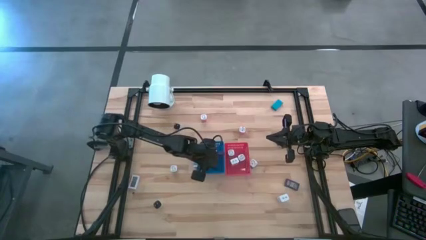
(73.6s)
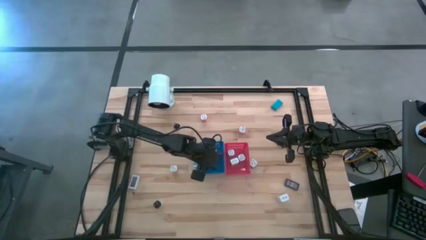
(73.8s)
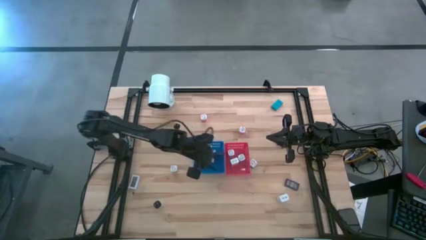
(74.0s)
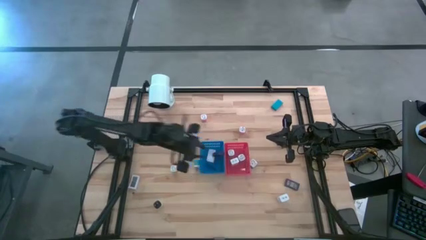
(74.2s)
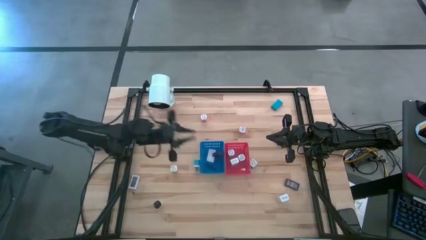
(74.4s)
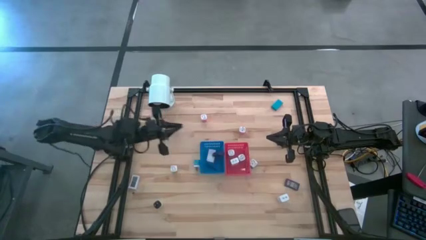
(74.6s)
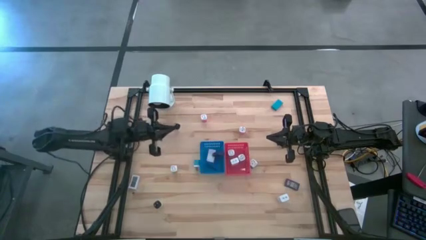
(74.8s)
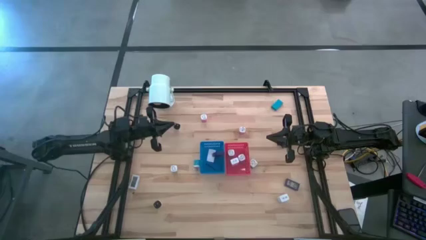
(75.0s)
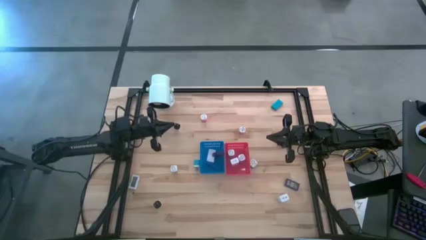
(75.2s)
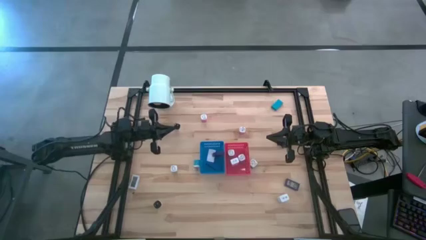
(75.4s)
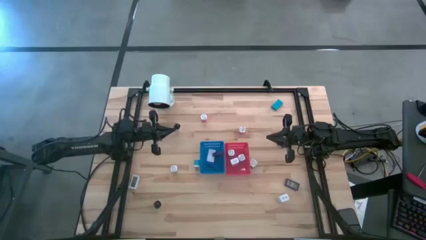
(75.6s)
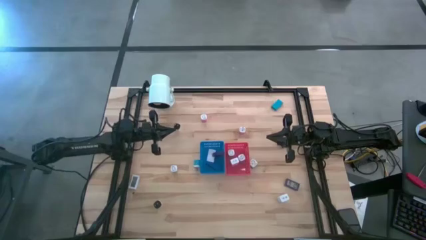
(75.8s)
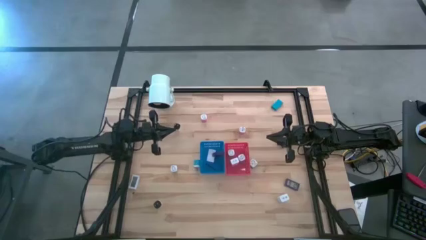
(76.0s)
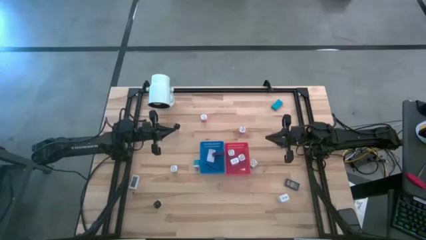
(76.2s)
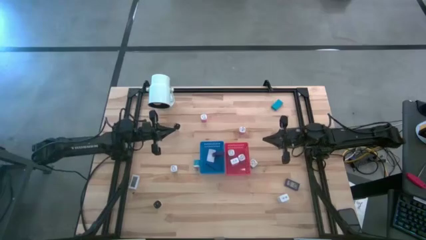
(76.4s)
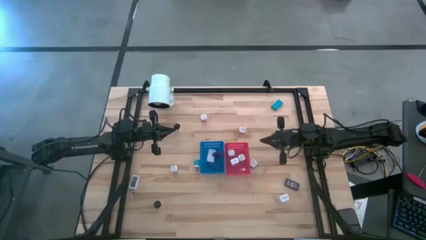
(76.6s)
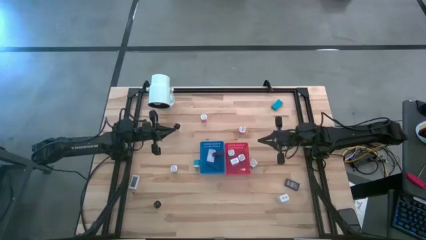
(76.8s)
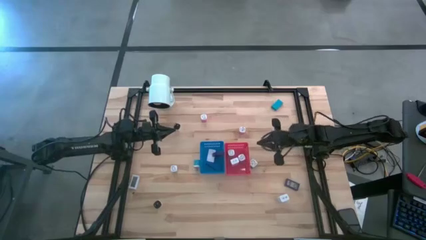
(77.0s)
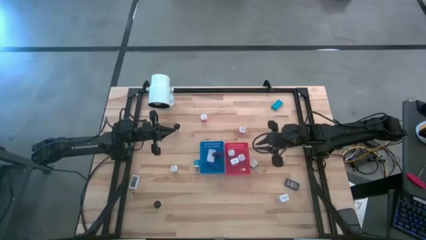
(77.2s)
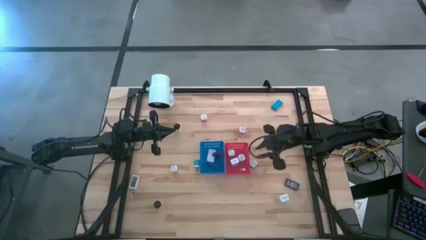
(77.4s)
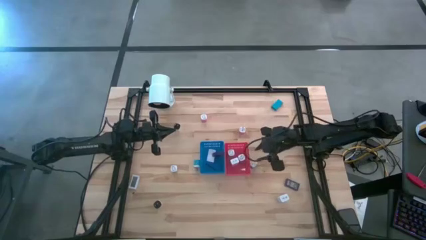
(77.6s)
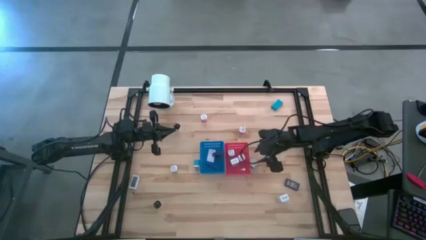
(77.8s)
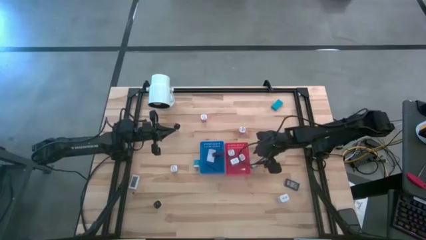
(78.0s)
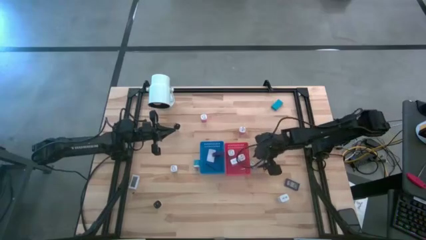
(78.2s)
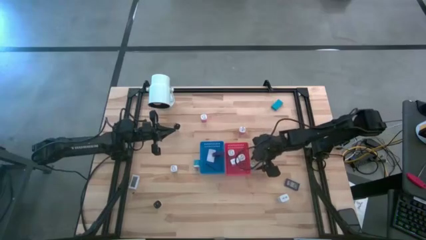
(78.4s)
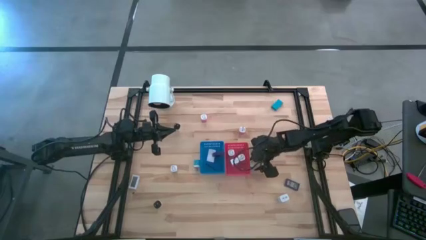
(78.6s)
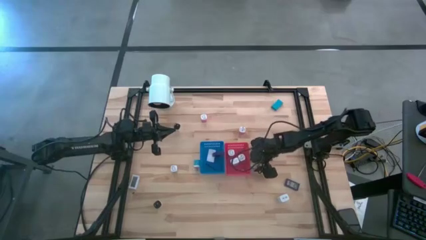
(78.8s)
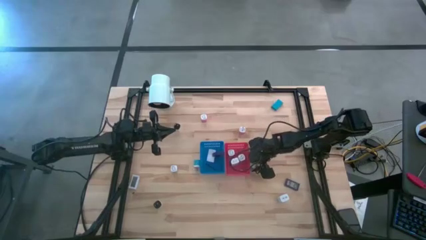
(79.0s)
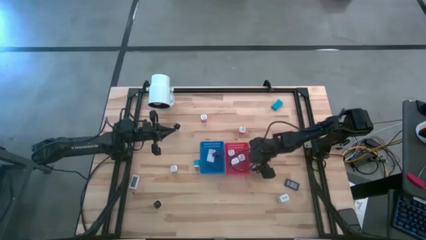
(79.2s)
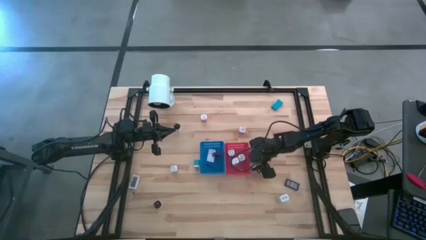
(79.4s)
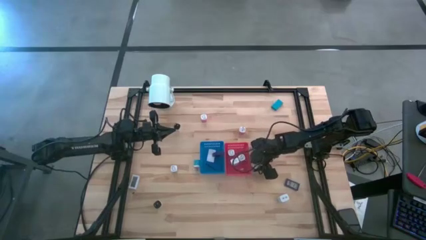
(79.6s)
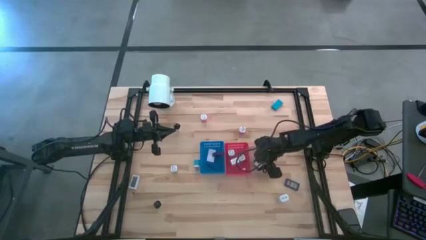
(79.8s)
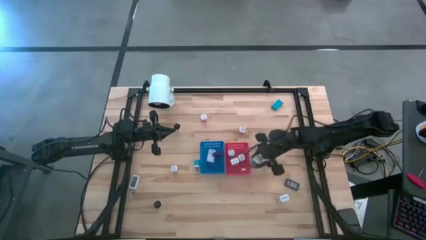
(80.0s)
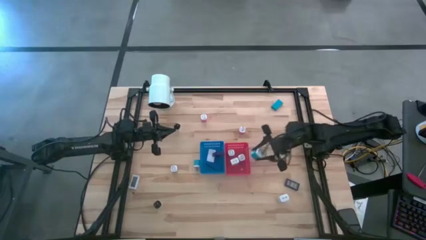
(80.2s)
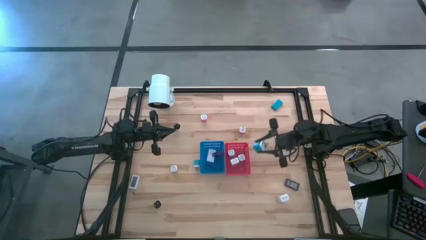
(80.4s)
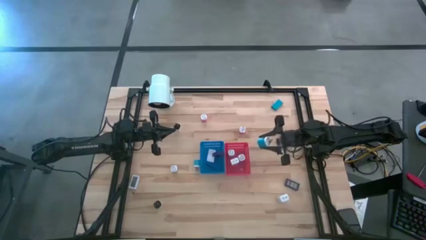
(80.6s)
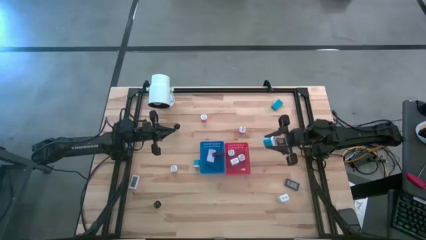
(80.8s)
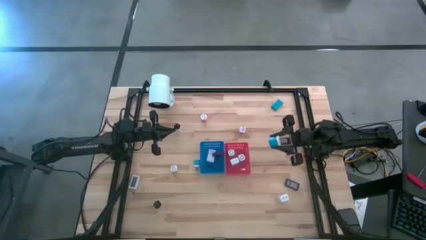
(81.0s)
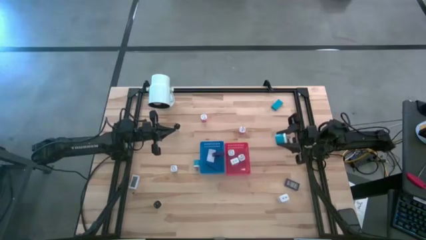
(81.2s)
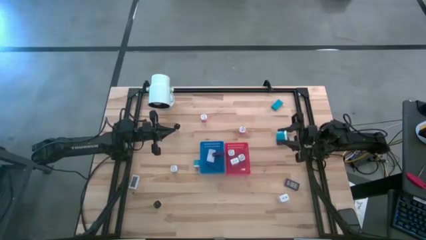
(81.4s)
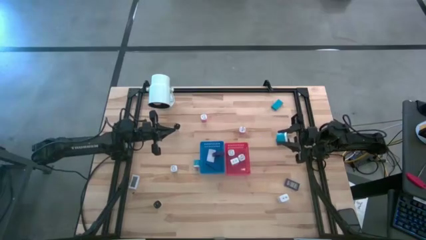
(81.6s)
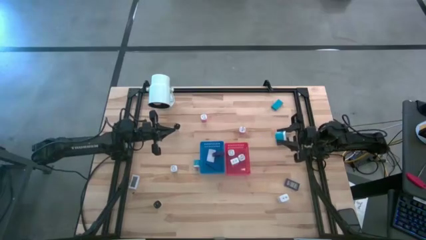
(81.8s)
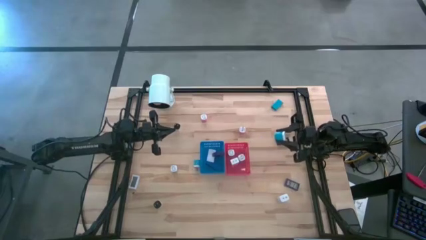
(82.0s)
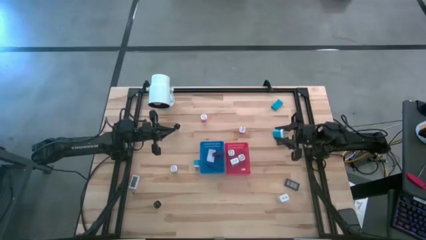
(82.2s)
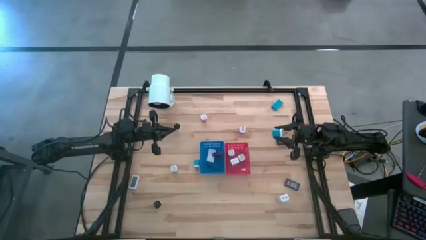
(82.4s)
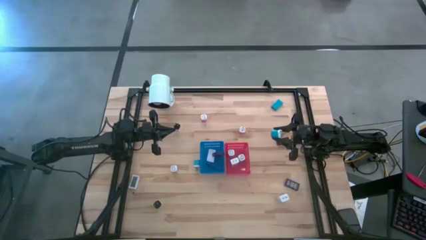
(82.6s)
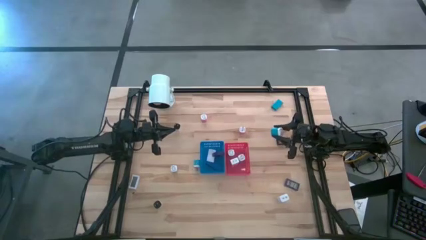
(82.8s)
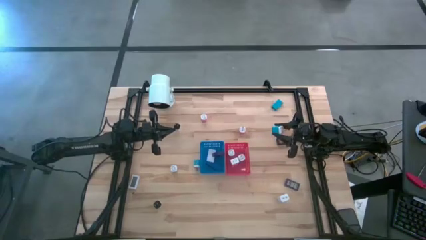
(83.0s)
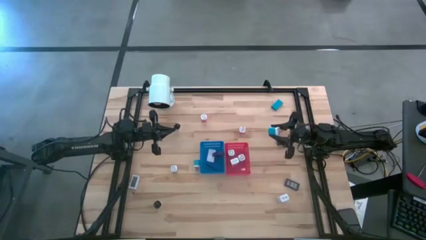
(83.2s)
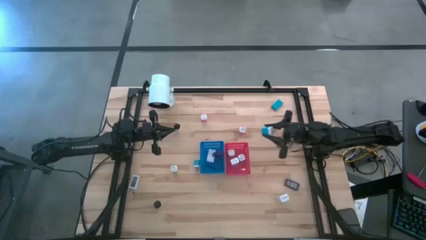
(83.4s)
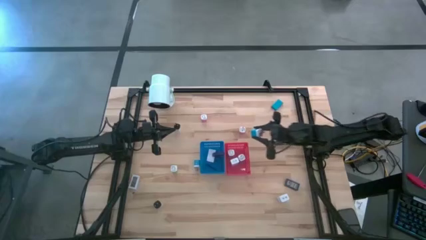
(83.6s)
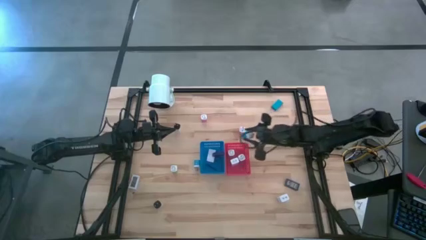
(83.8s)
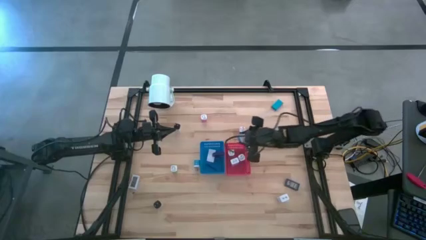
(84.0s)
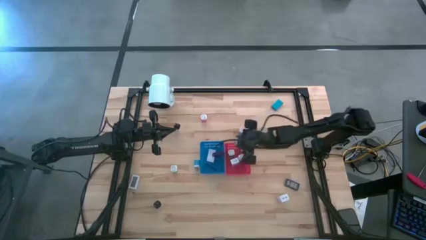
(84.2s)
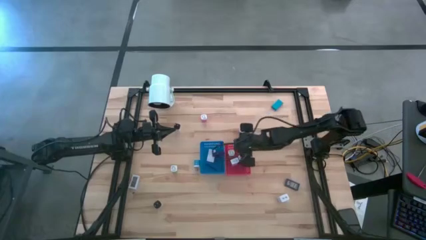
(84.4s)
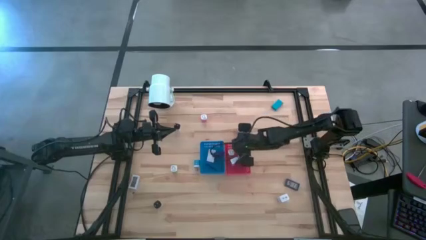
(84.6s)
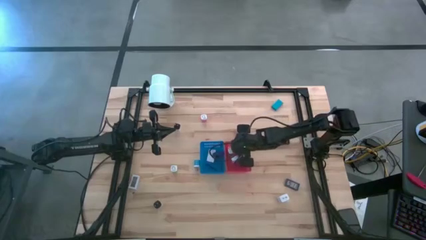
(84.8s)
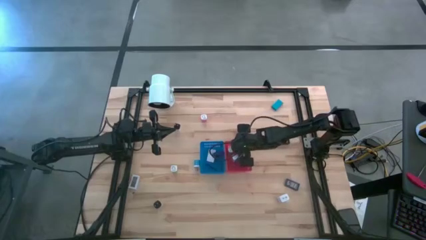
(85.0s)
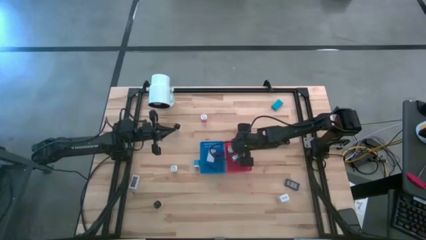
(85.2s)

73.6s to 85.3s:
Task: Sort adapters and digital timers
Put the right light blue charger adaptor into the red bin

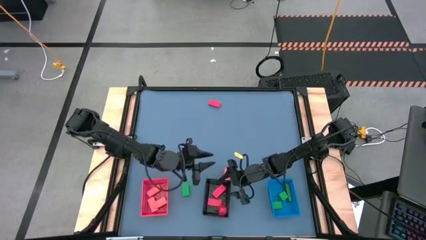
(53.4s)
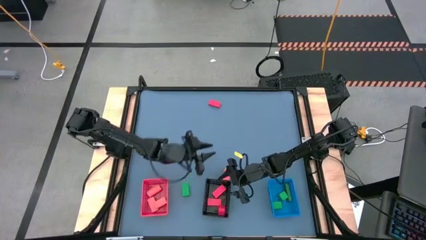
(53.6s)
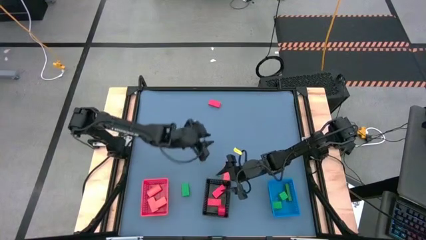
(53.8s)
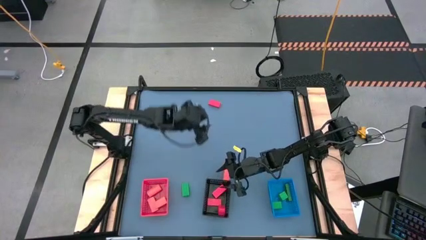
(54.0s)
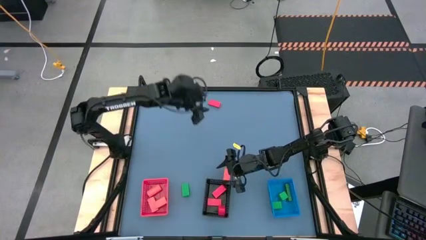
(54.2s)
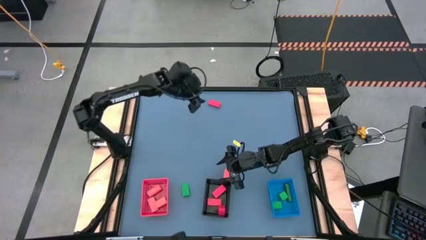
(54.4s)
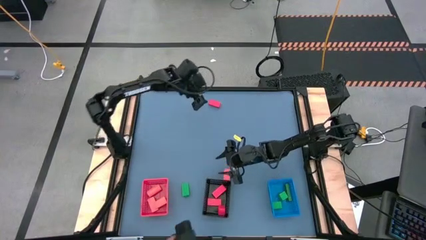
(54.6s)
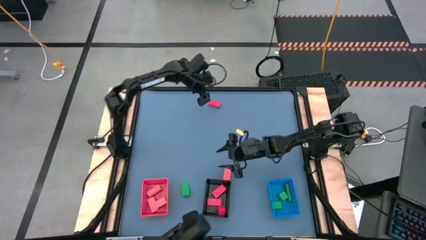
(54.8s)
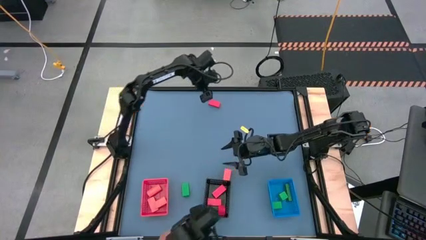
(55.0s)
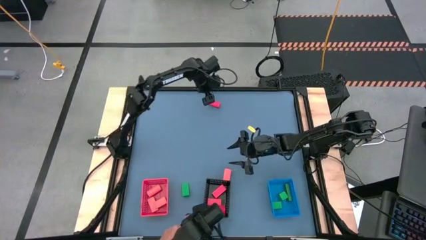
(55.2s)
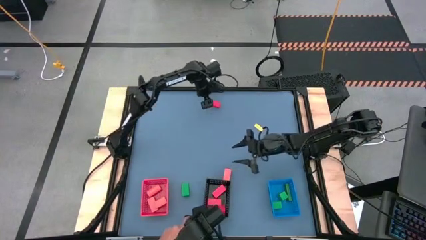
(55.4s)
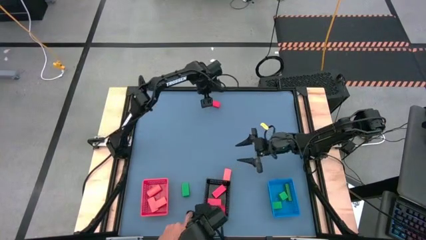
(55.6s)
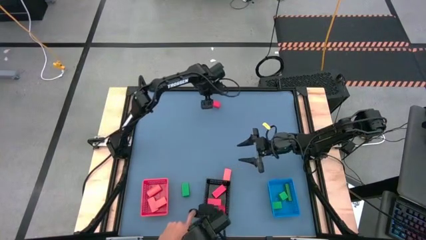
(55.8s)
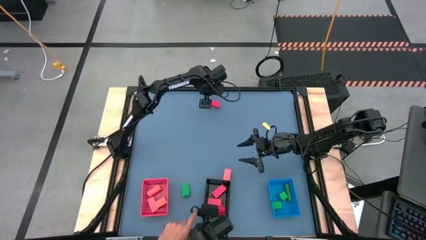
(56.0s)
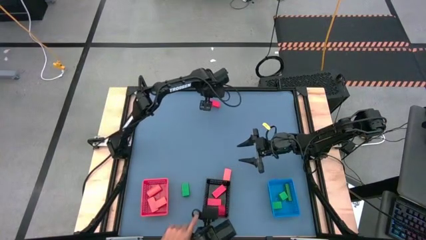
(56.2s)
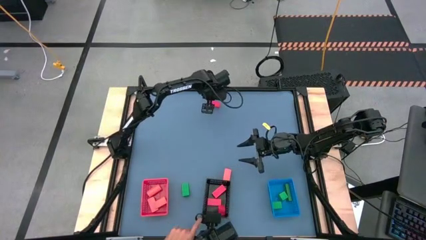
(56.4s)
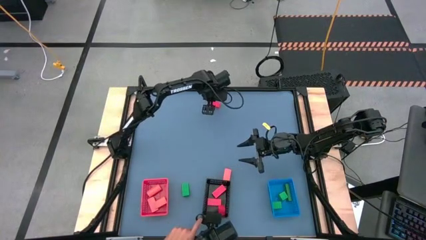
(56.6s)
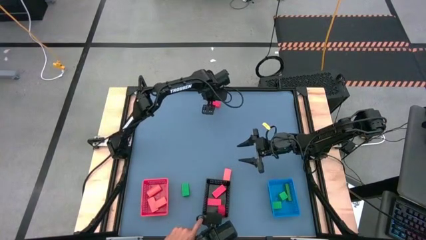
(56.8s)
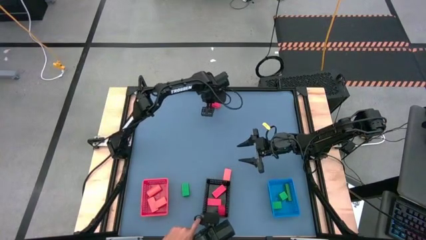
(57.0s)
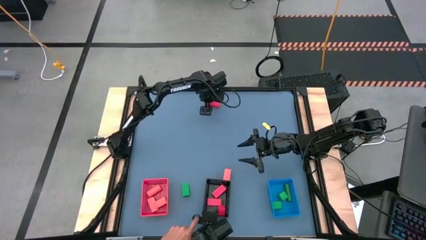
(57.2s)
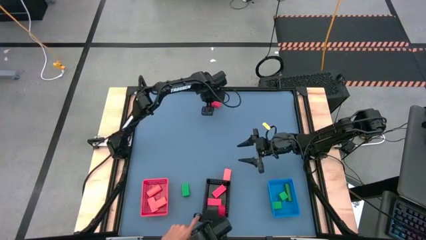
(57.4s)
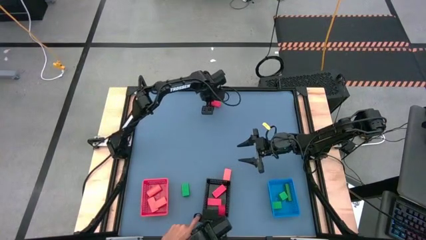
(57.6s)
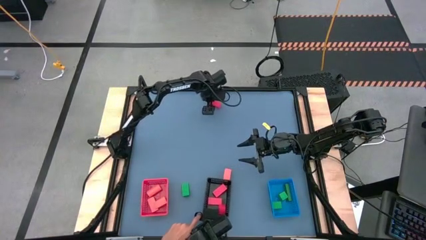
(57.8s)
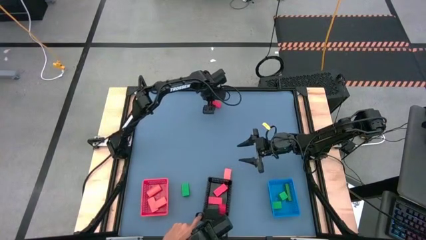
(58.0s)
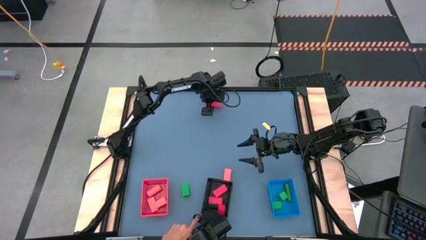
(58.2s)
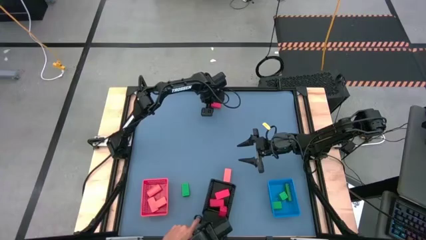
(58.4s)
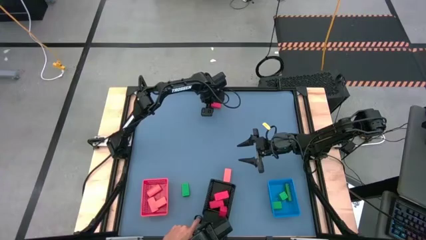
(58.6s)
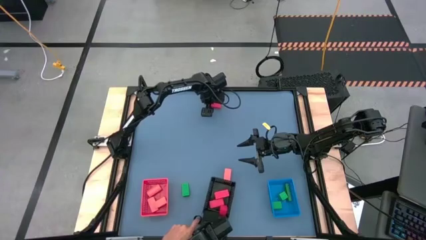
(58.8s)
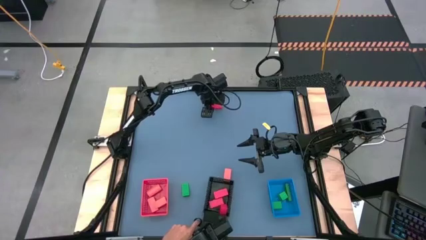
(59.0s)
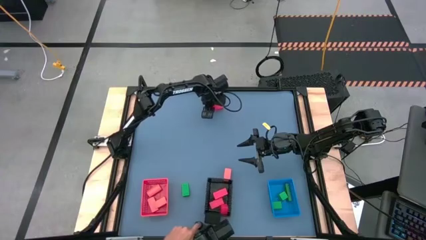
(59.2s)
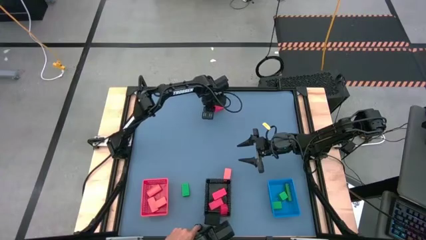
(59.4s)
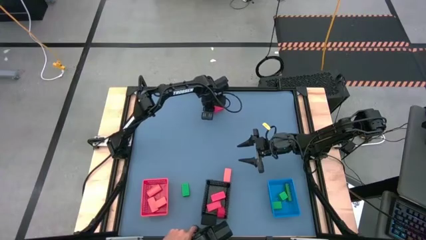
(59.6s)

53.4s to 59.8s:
Task: Sort & place blocks by color
Put the red block into the black bin
